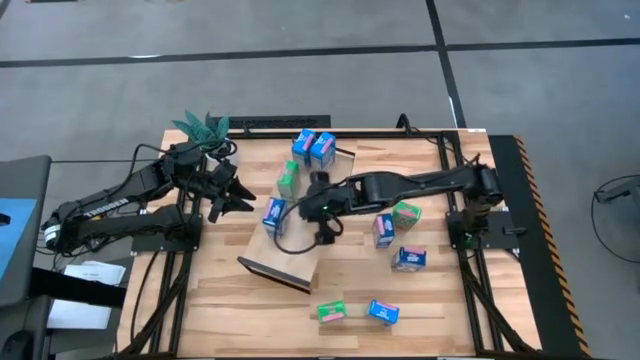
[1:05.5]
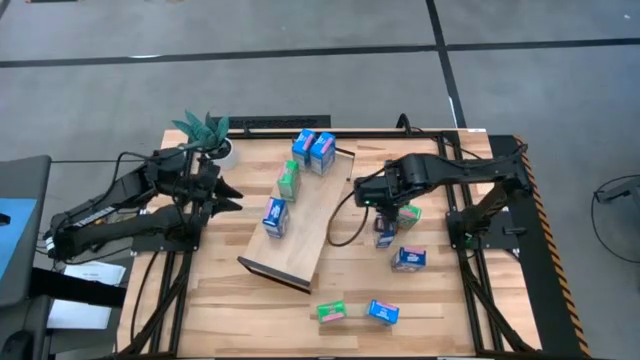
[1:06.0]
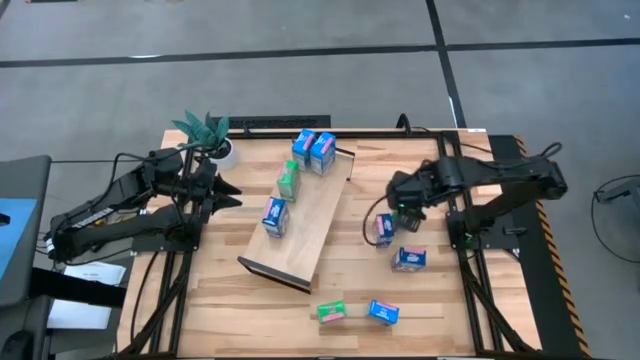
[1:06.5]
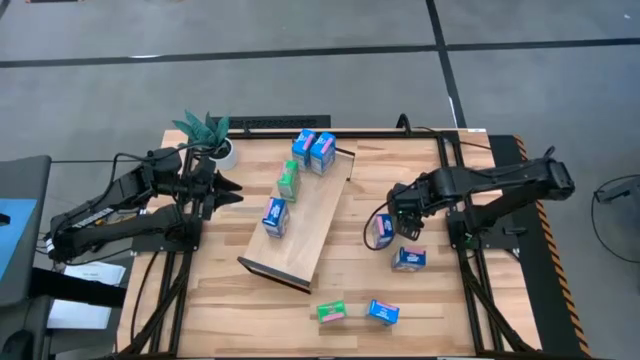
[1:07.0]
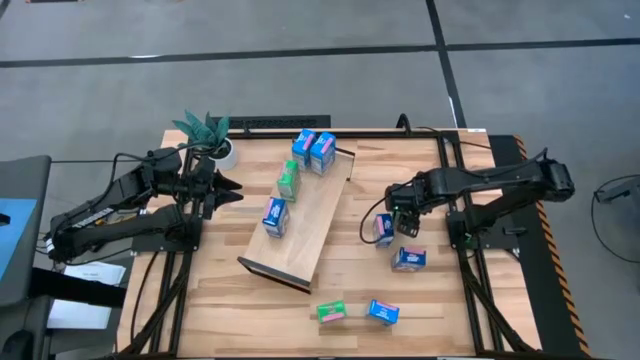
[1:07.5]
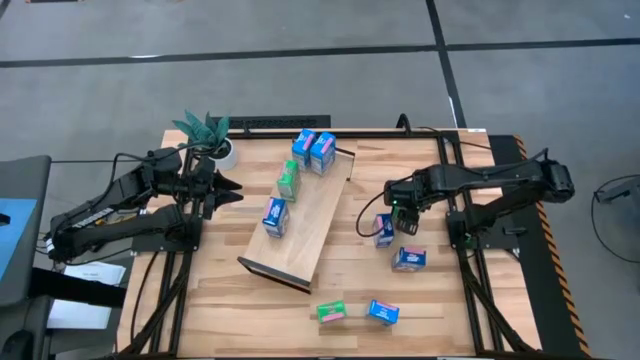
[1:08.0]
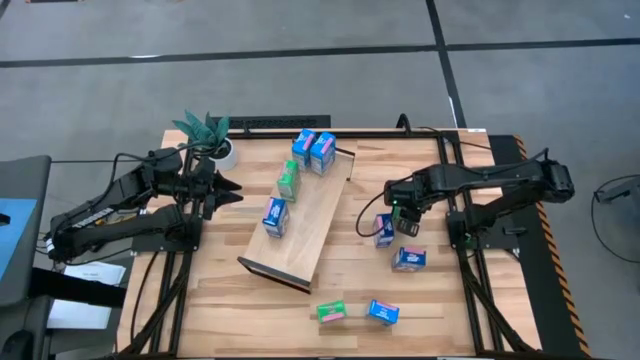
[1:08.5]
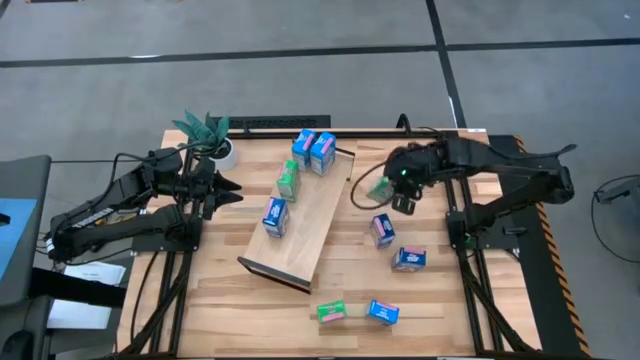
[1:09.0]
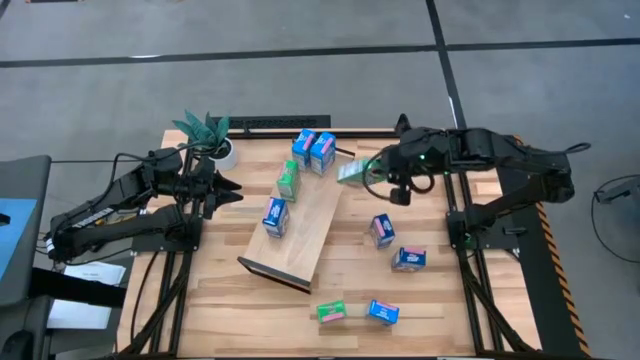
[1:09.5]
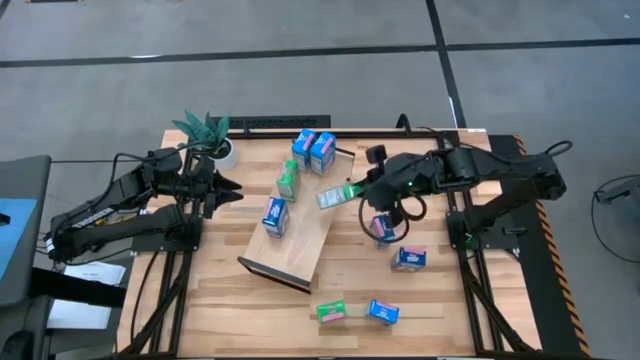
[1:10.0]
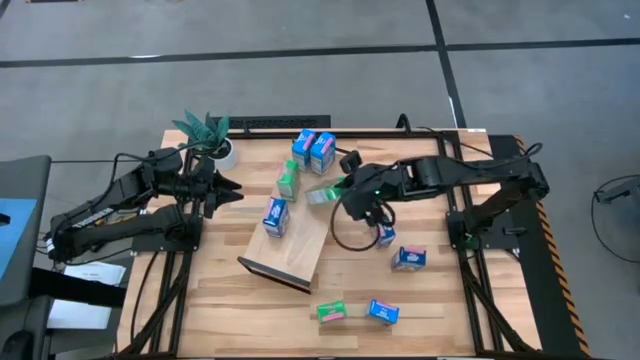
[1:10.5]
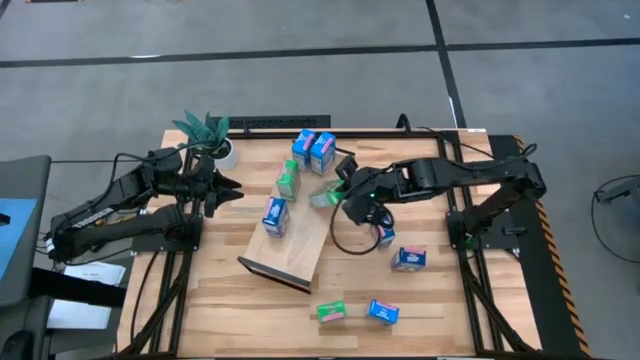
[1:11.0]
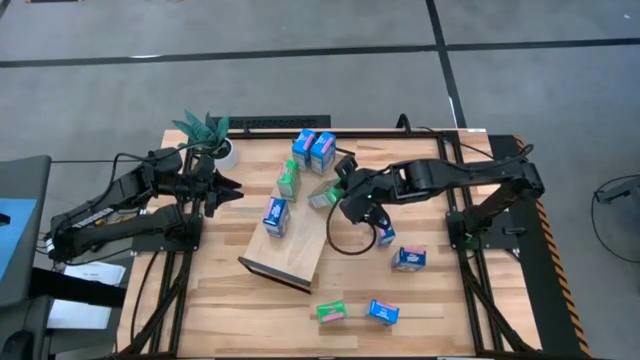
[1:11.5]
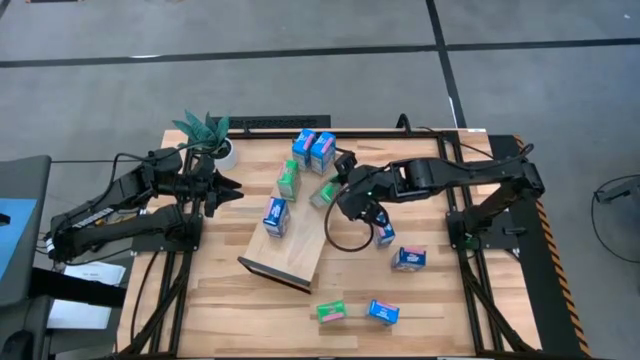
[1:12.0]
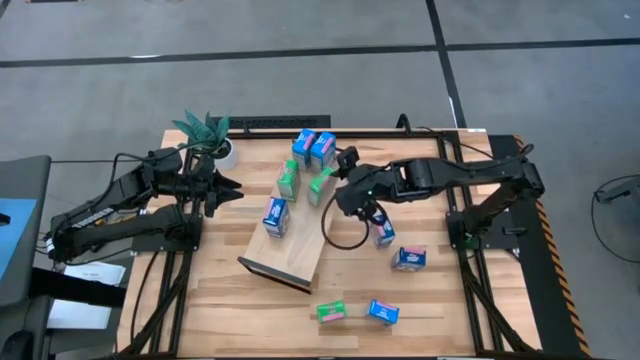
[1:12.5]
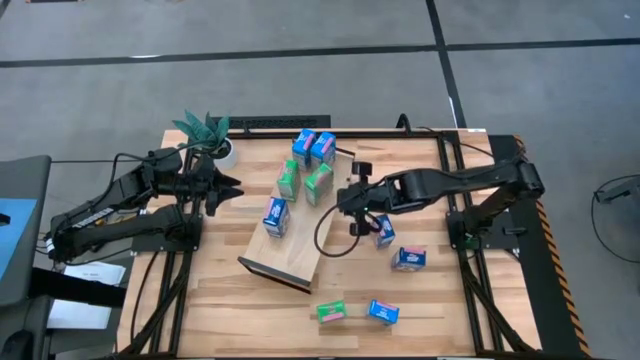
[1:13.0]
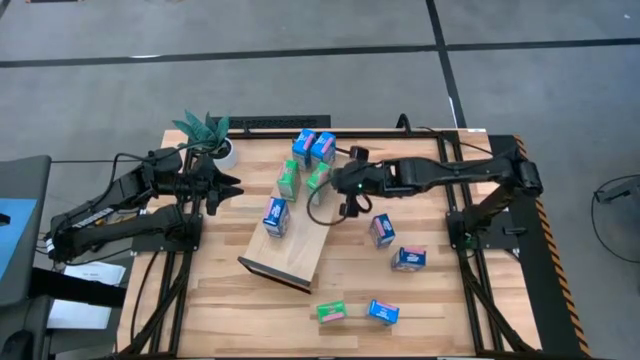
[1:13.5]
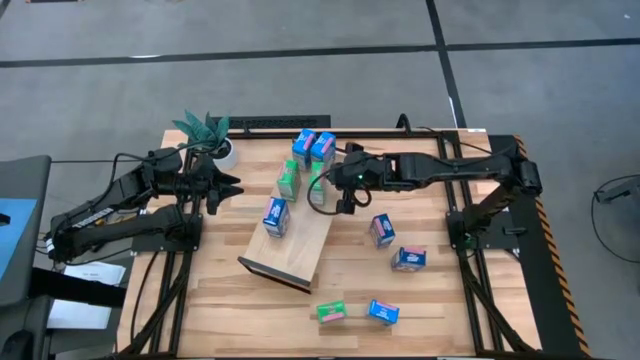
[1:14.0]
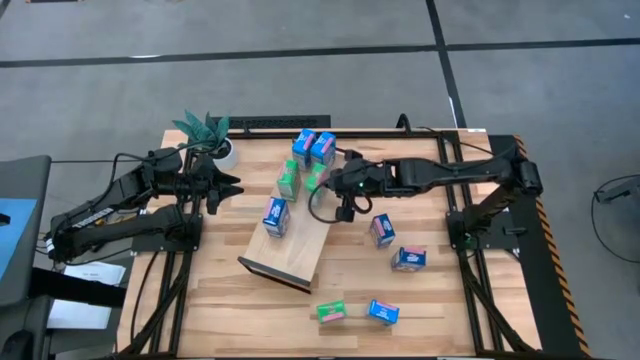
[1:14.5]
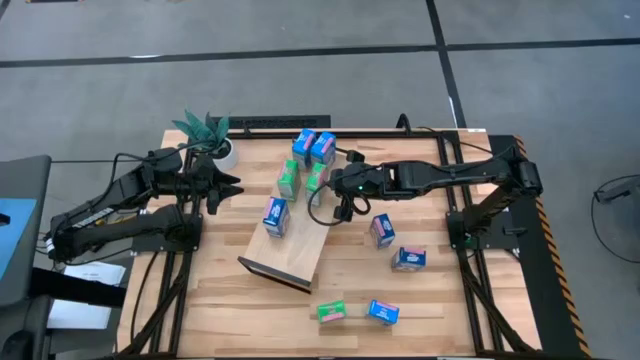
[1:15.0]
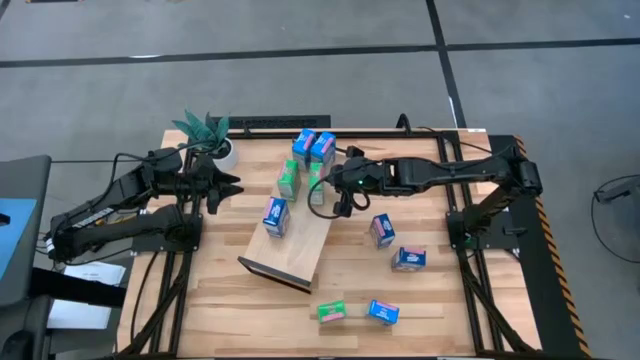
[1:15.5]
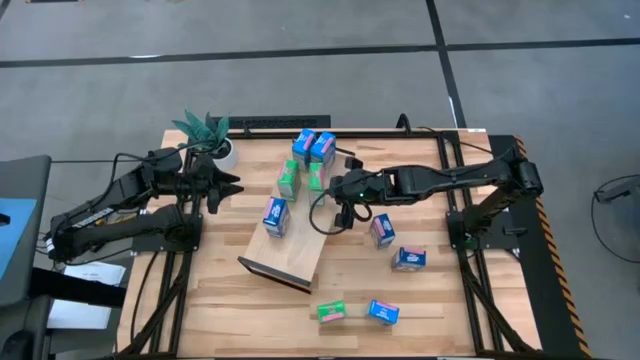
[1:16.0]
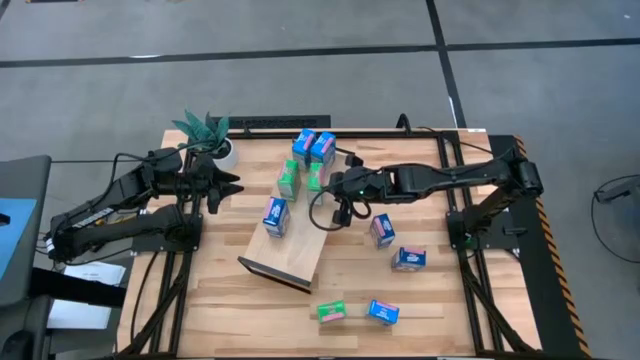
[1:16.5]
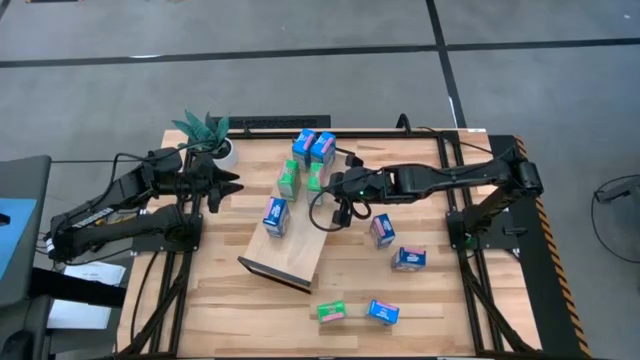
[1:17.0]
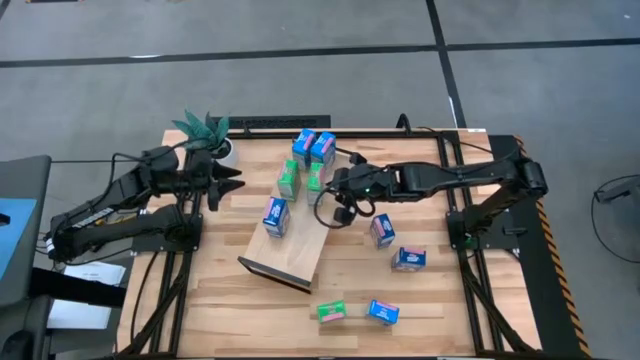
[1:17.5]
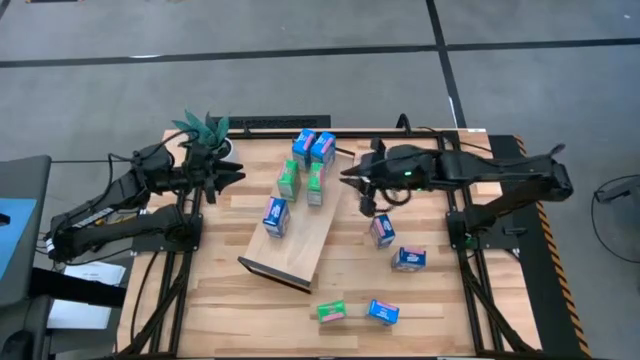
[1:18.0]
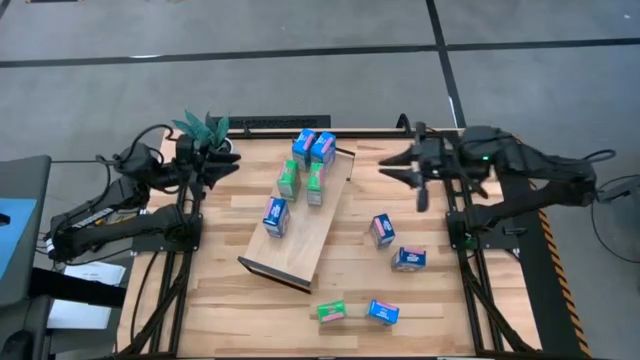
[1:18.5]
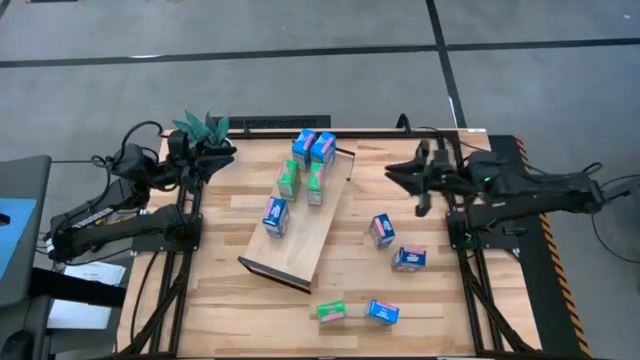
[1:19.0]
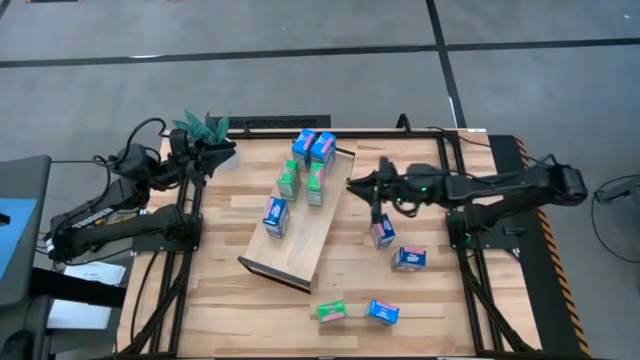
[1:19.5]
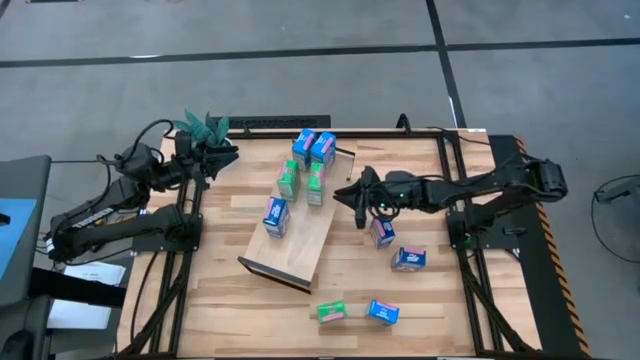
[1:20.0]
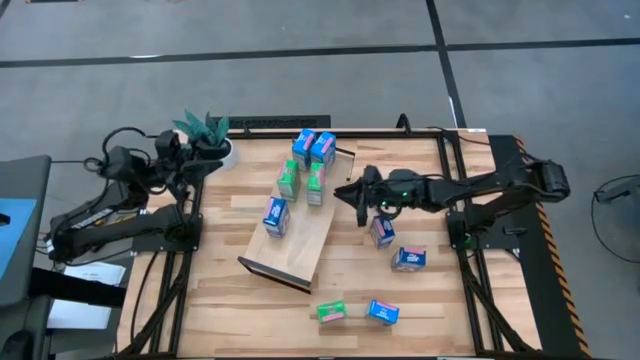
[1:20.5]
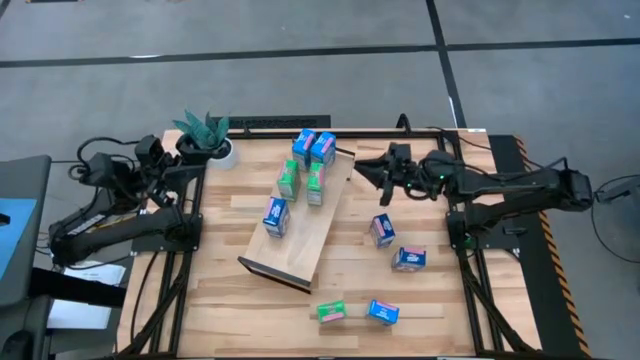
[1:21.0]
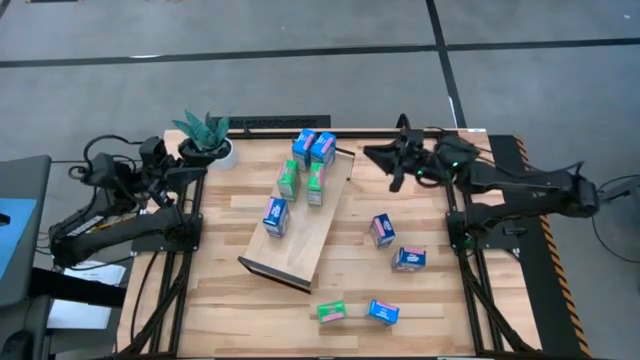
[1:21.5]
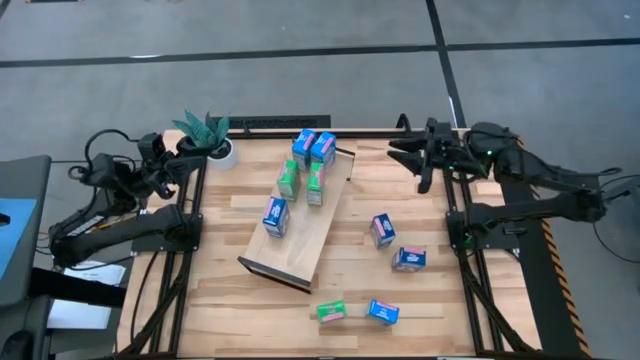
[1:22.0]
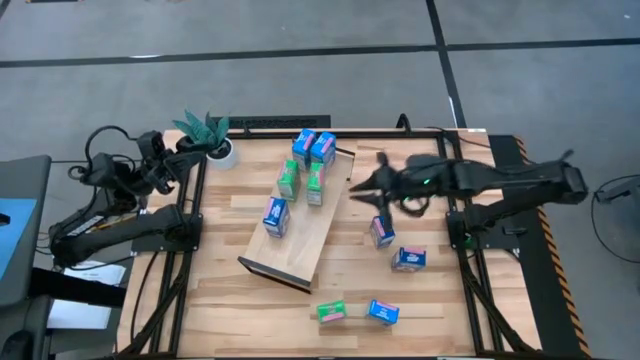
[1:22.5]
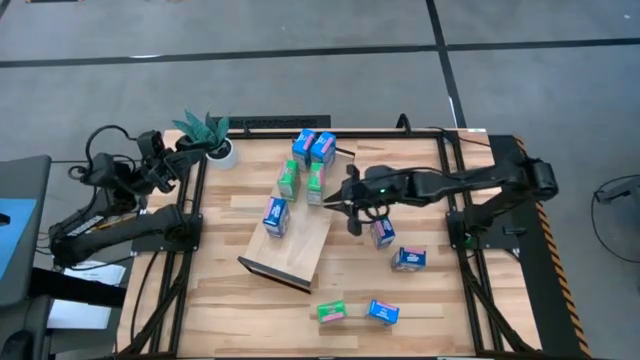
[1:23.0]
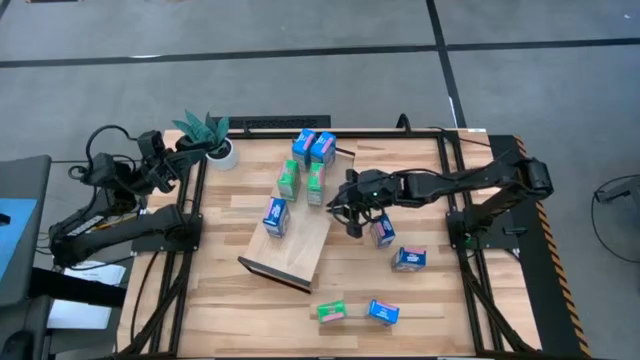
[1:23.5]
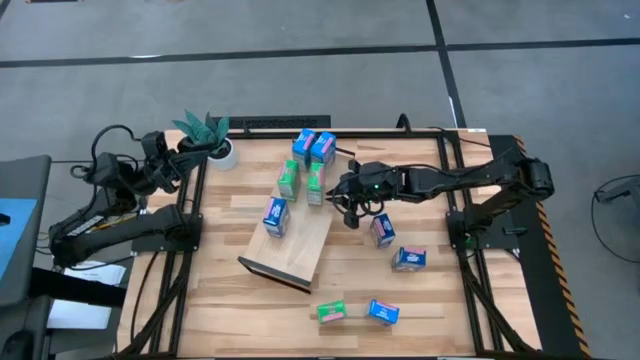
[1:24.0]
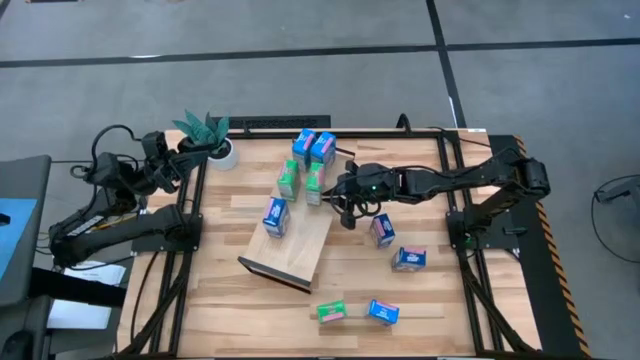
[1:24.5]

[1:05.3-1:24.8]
Task: Stack cereal on shelf
Put the top green cereal box on the shelf aligned with the other green cereal box

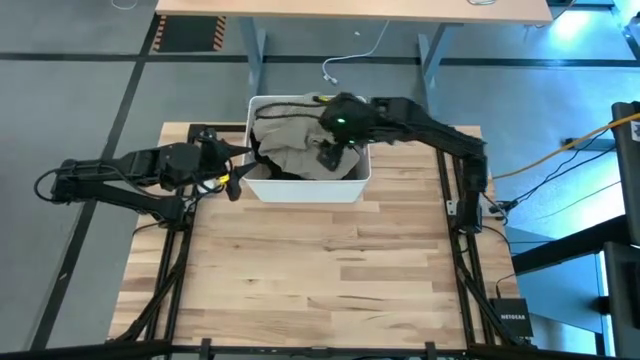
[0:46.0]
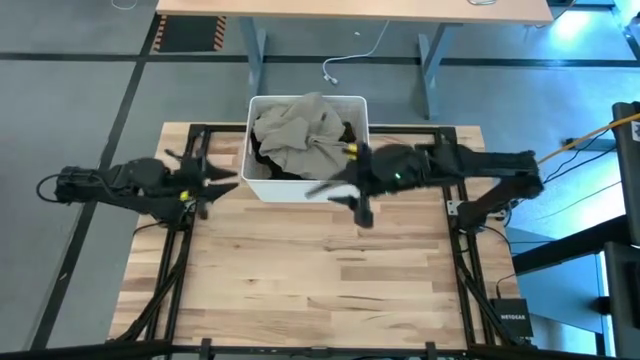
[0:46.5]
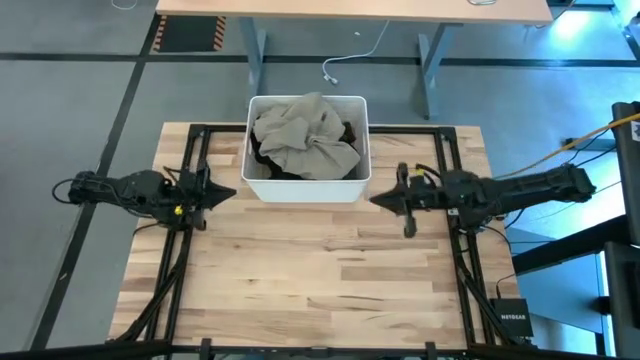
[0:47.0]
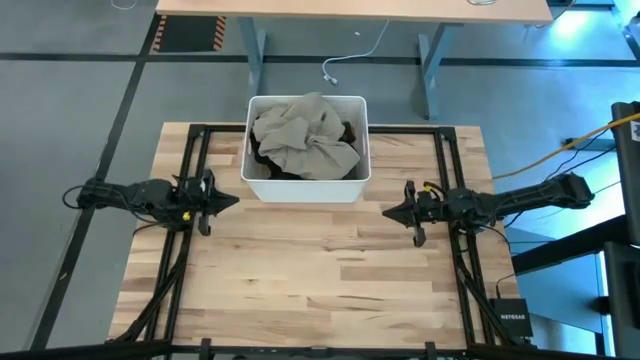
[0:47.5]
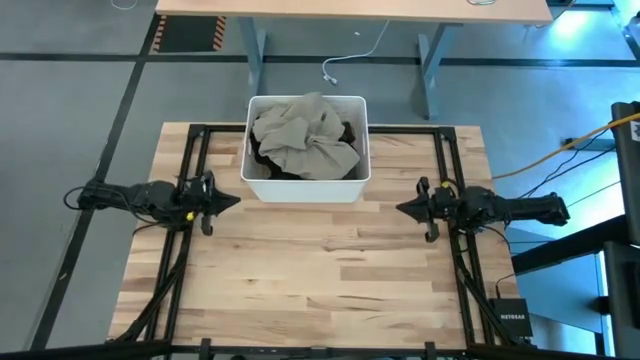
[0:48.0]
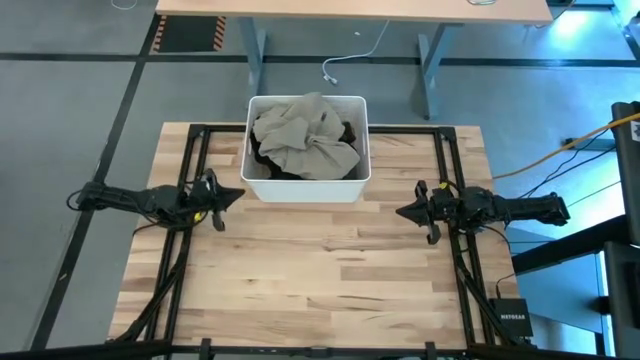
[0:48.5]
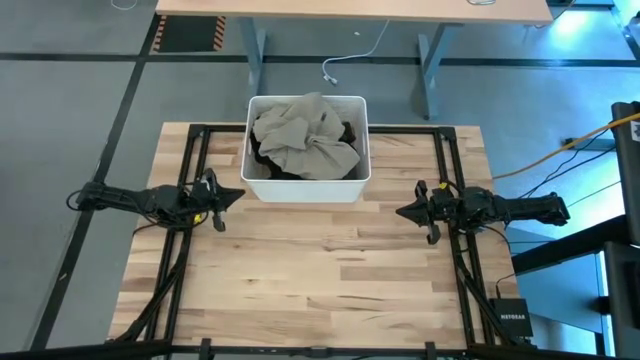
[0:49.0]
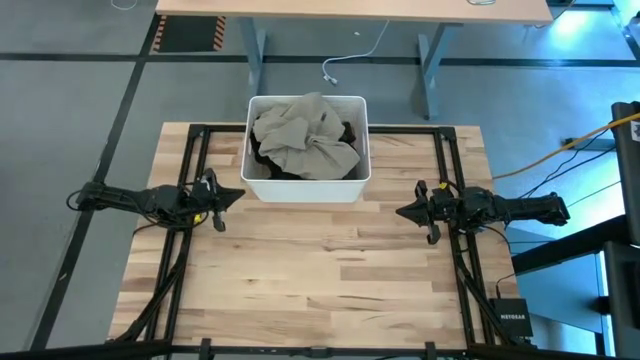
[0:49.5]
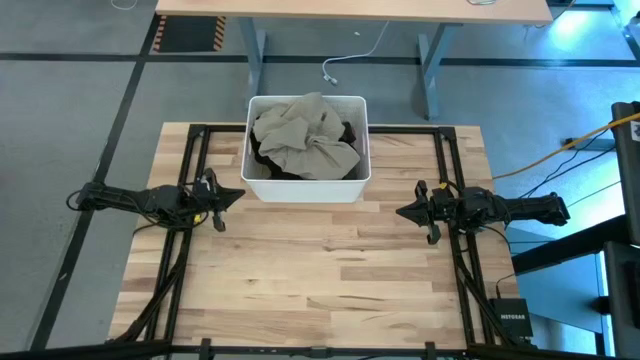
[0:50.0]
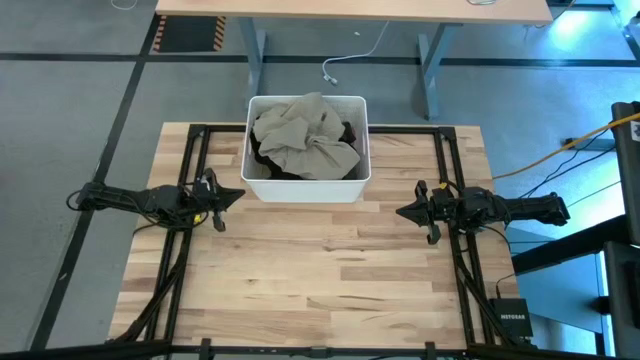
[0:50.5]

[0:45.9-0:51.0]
Task: Sort clothes
Return to Home Position
